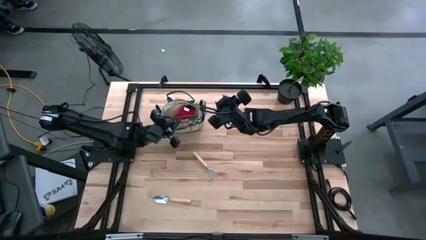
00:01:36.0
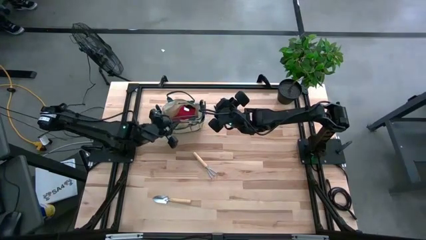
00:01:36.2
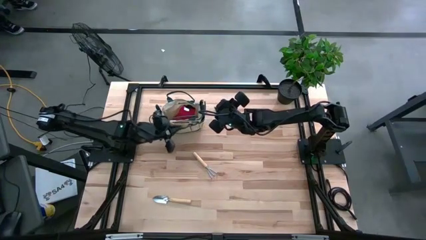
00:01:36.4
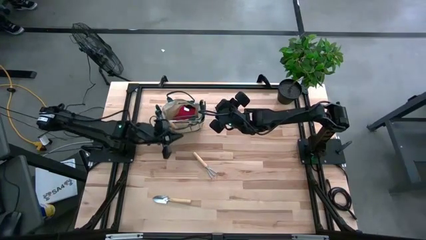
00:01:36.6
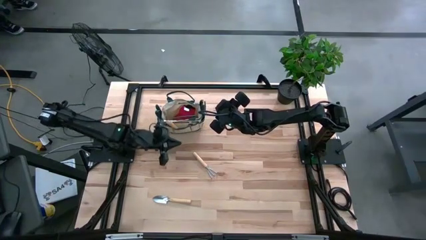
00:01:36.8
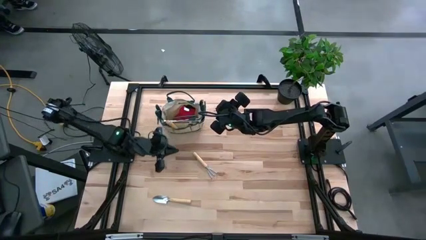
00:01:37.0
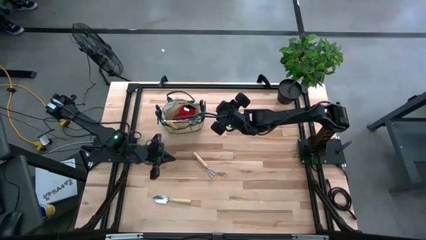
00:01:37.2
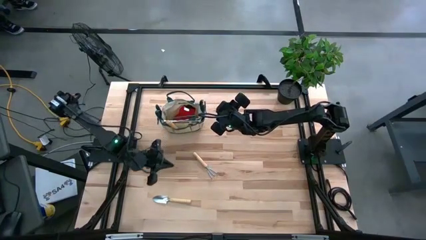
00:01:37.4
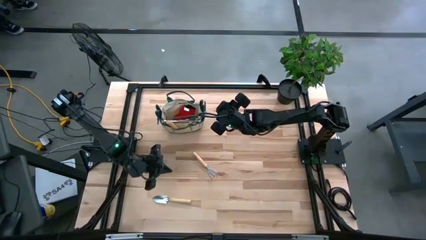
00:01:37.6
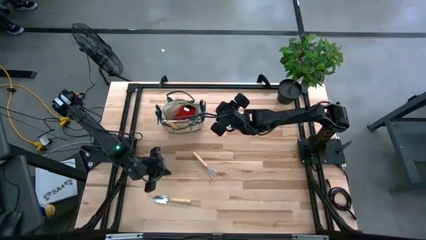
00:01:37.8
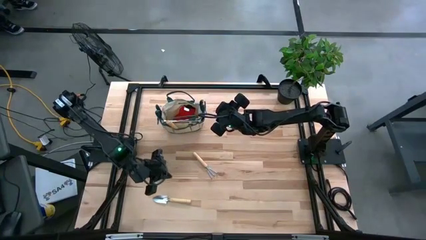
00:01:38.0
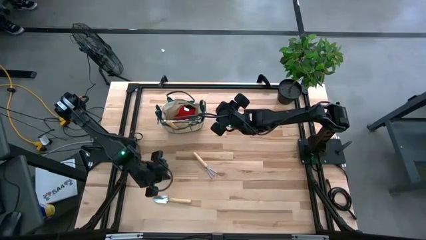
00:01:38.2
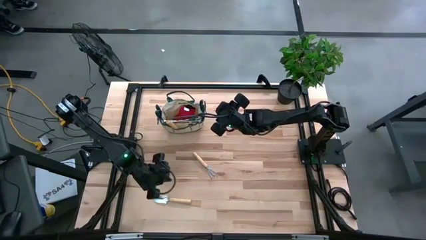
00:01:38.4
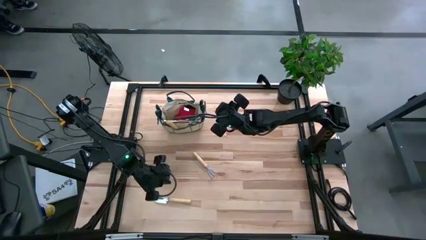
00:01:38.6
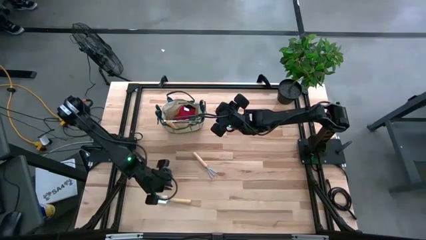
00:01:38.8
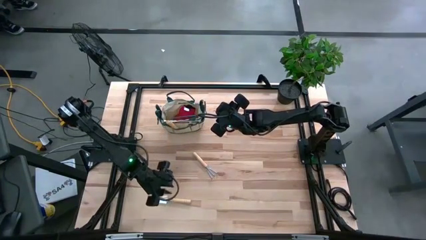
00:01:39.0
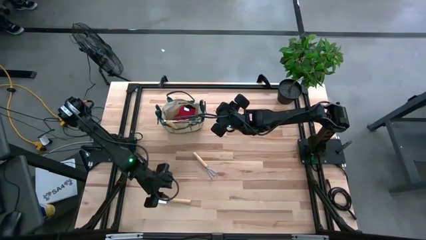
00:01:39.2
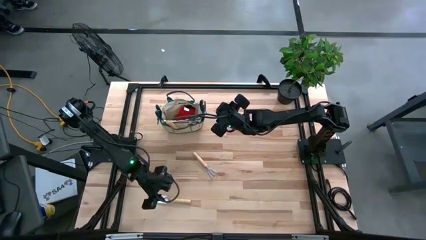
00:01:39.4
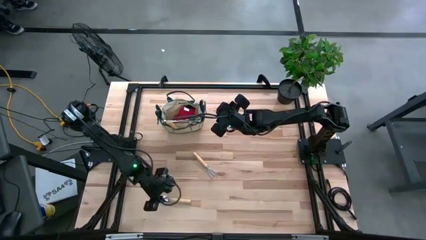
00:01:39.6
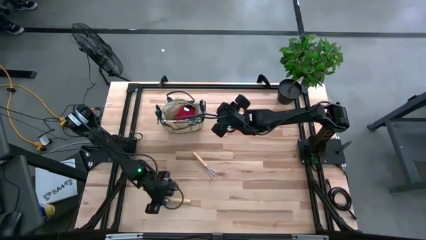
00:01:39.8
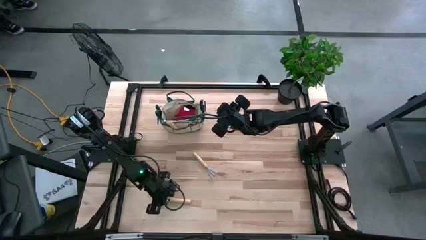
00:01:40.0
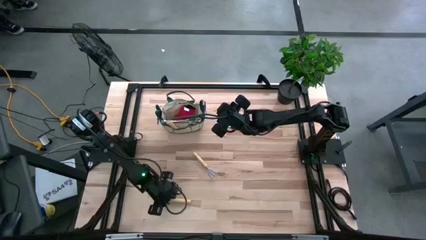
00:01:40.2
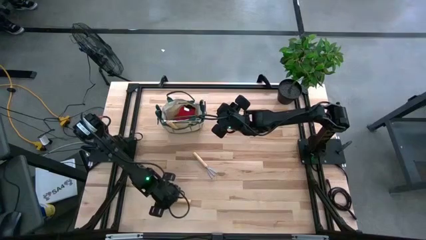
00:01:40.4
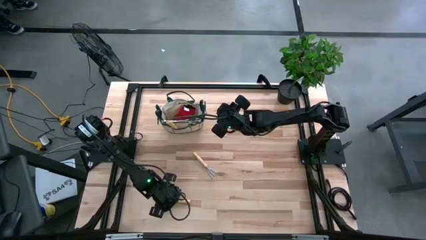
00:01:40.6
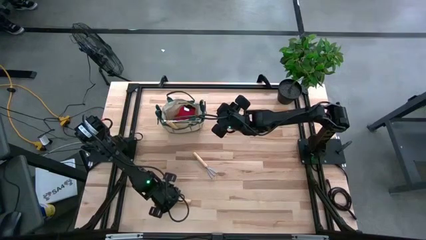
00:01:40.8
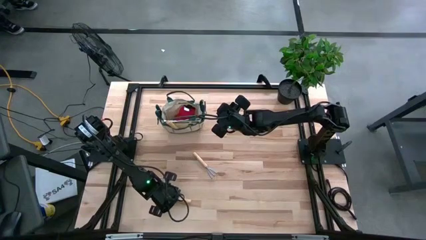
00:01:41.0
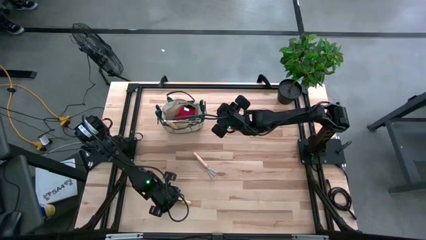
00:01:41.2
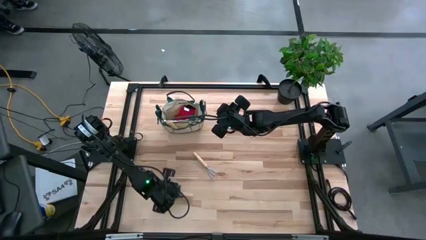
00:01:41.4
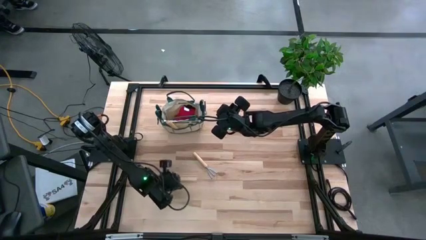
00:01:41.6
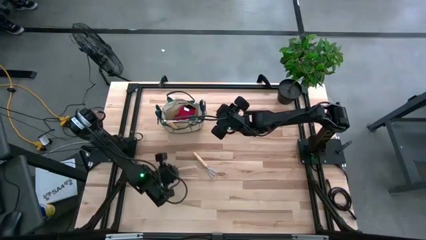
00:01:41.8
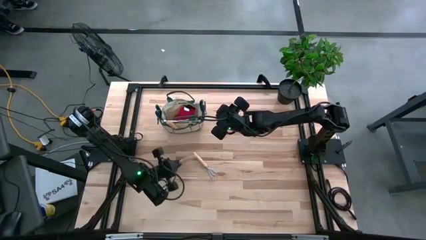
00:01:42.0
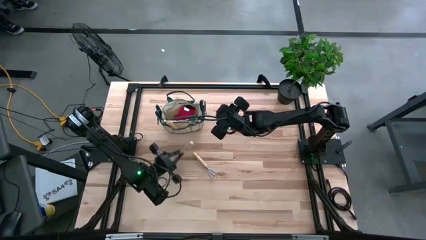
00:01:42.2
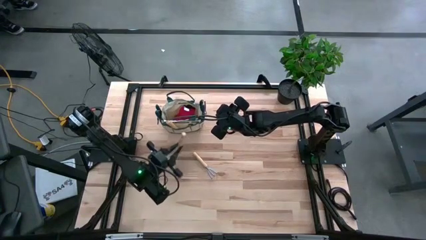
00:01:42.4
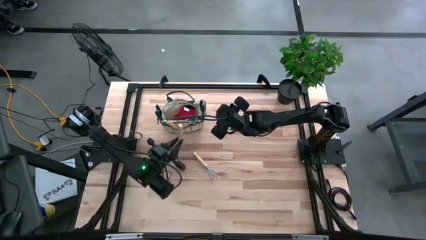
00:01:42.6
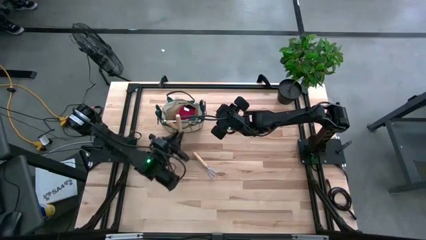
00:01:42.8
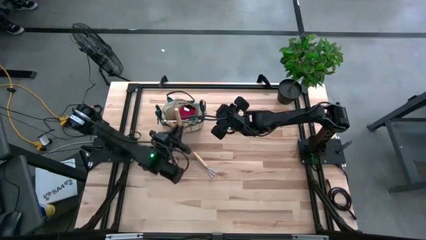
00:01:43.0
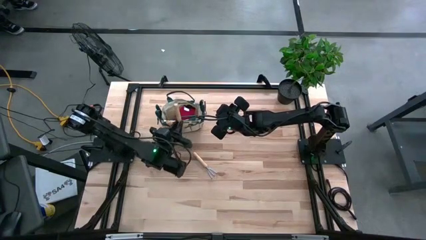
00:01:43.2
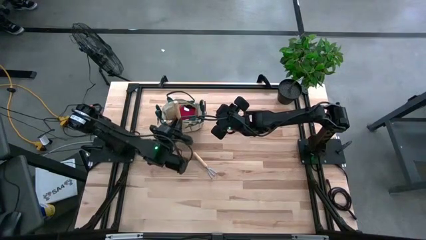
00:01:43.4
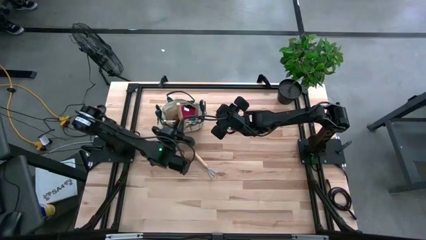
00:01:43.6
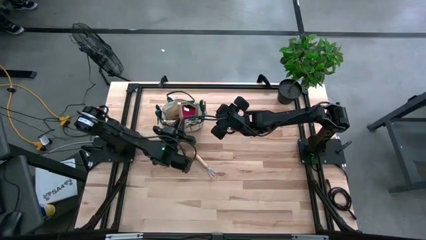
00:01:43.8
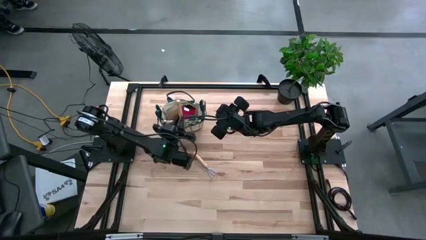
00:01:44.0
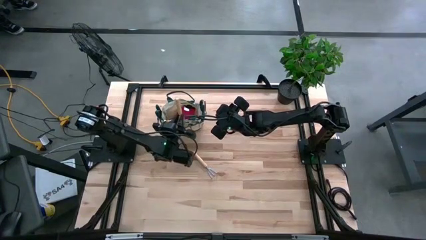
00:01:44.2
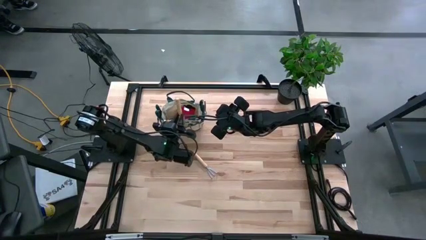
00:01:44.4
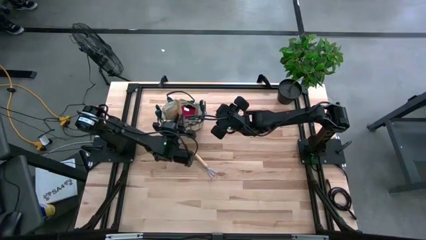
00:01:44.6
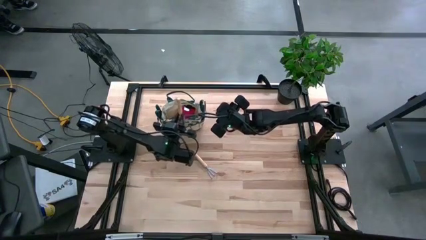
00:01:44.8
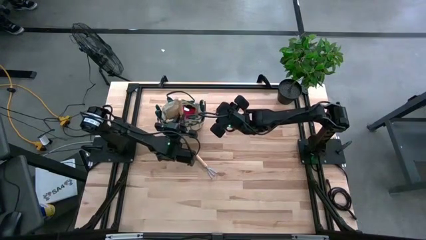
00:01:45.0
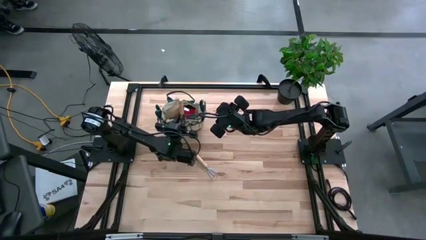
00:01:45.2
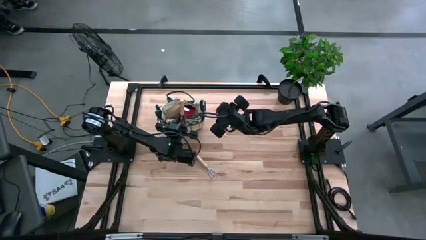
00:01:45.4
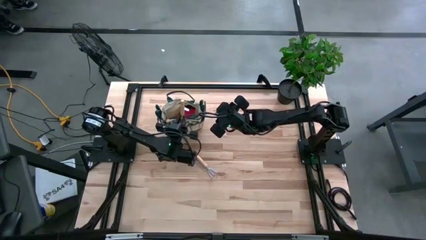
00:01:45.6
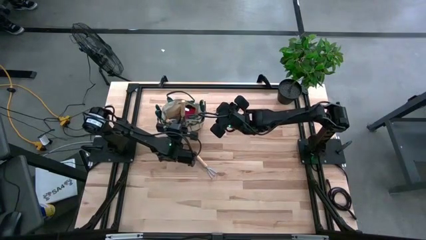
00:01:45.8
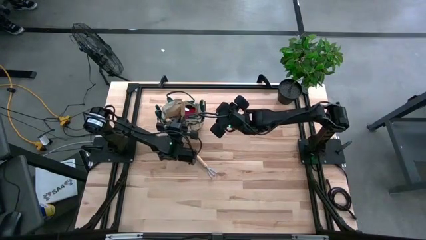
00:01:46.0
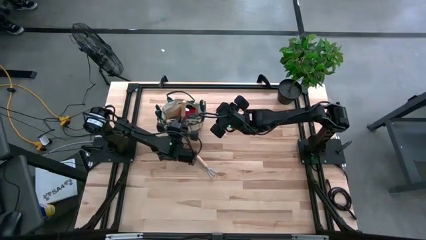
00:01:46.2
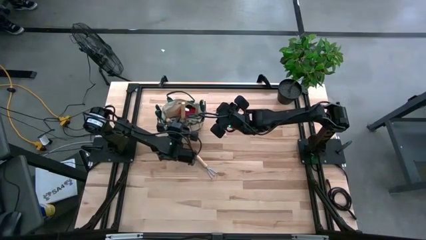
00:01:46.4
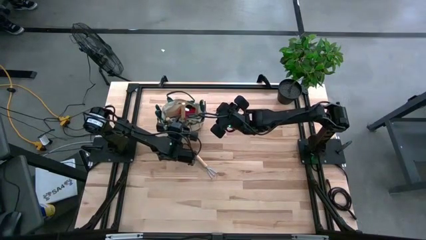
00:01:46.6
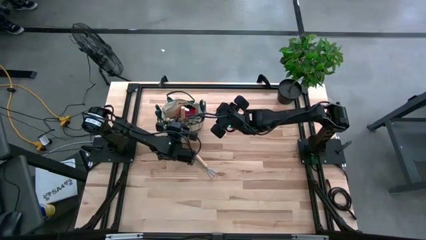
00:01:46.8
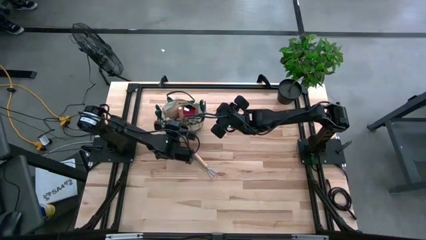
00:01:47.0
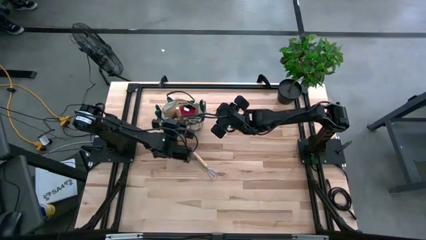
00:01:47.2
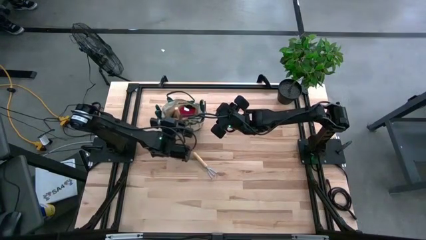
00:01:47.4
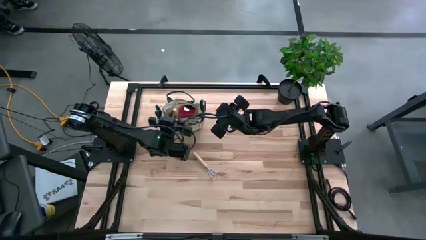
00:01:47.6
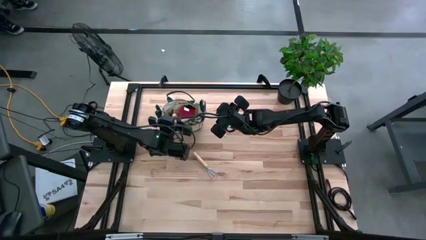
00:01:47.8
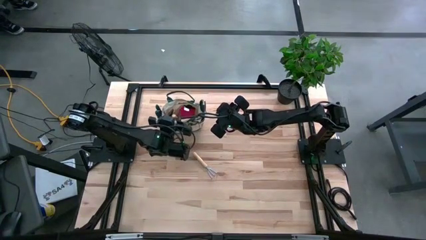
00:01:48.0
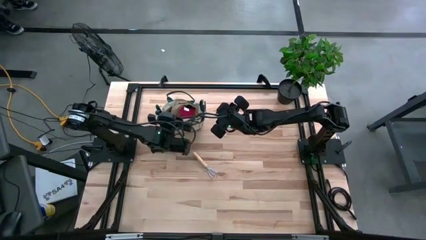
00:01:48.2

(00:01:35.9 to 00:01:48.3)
Task: Pick & Place Garden tools in Gardening bag
Put the brown trowel into the gardening bag
